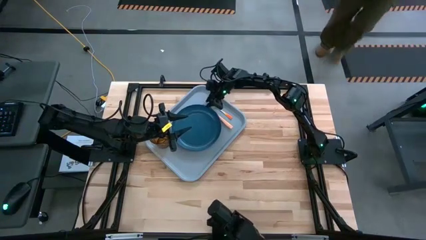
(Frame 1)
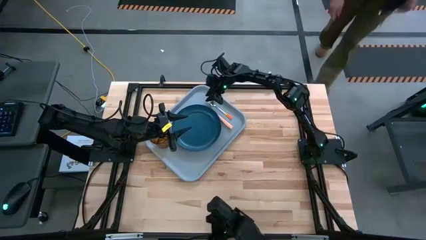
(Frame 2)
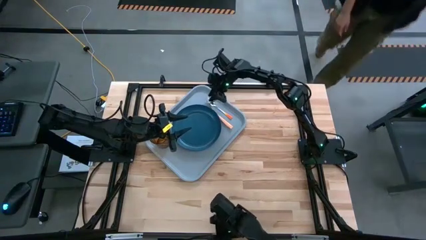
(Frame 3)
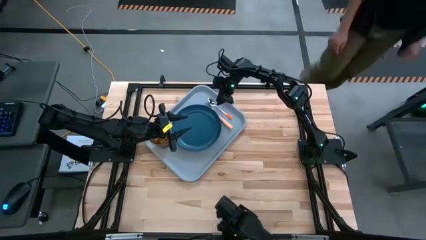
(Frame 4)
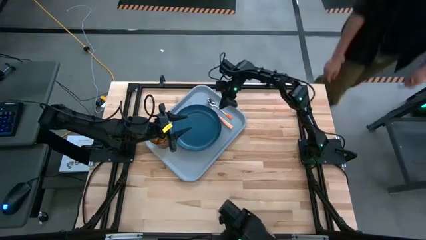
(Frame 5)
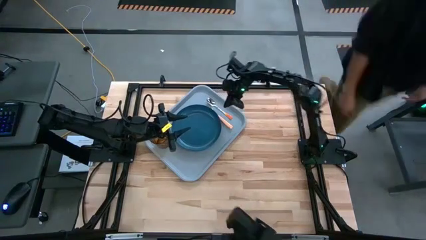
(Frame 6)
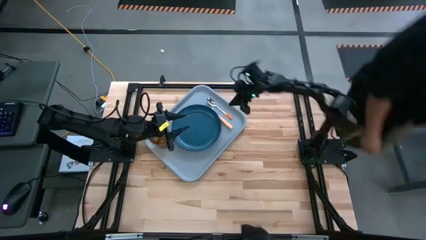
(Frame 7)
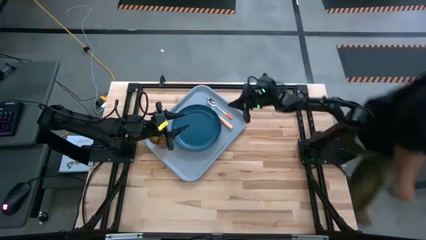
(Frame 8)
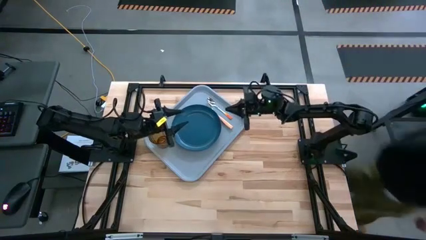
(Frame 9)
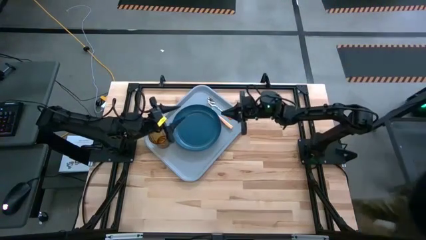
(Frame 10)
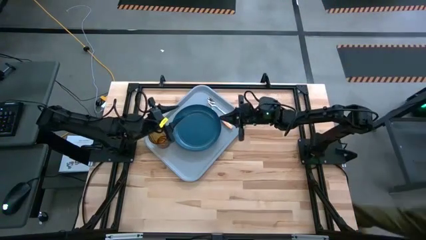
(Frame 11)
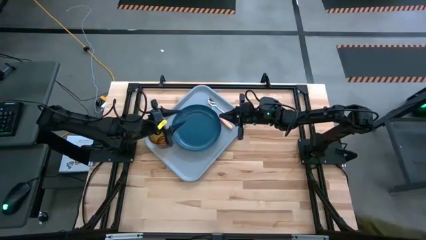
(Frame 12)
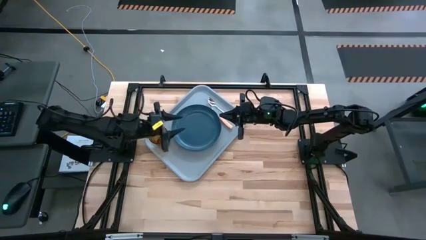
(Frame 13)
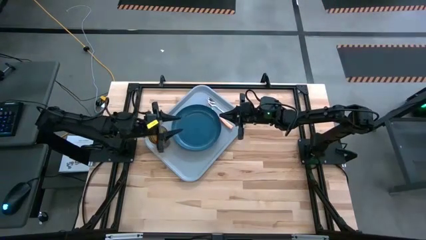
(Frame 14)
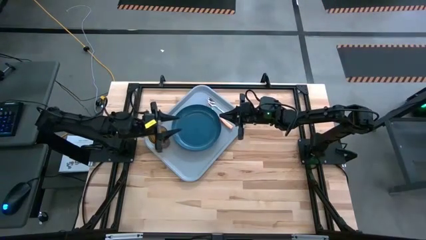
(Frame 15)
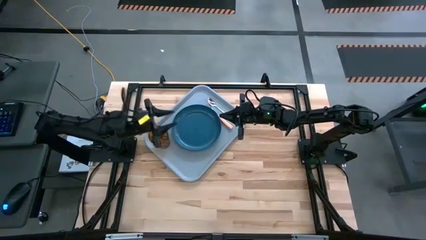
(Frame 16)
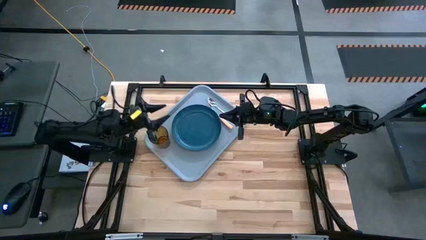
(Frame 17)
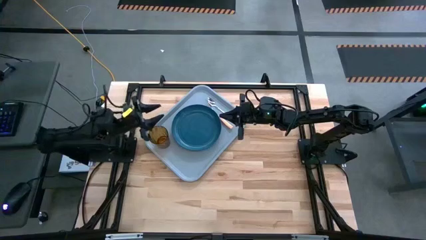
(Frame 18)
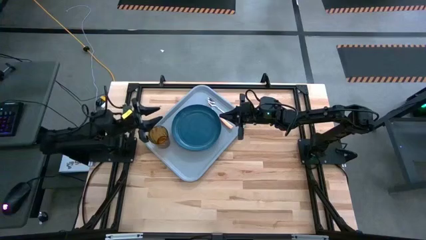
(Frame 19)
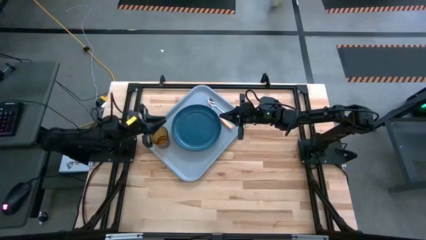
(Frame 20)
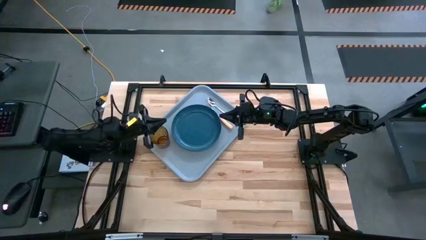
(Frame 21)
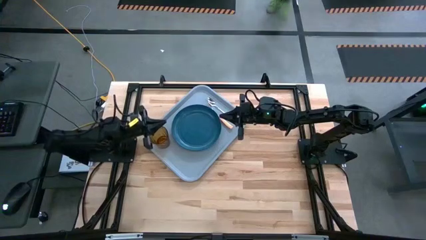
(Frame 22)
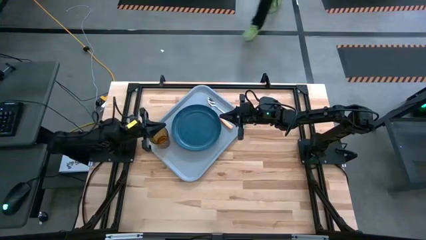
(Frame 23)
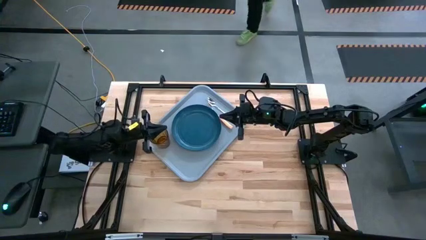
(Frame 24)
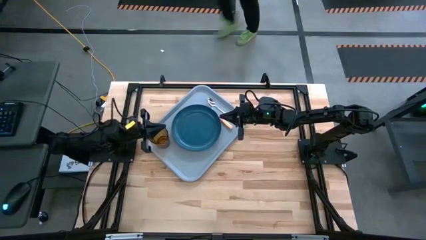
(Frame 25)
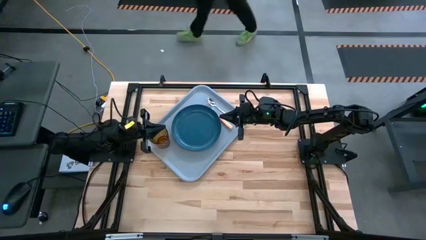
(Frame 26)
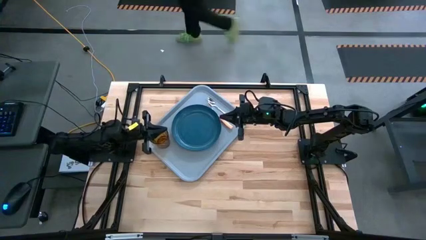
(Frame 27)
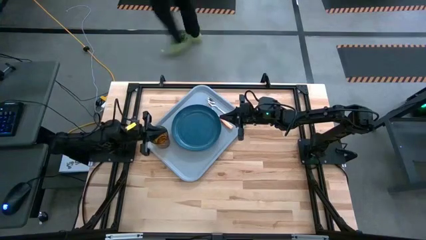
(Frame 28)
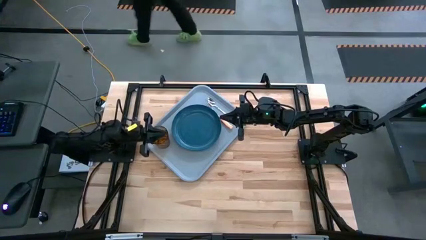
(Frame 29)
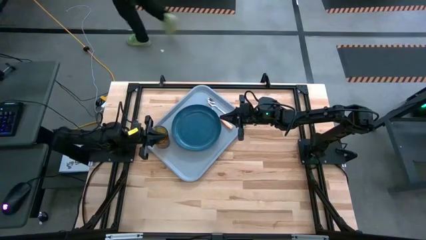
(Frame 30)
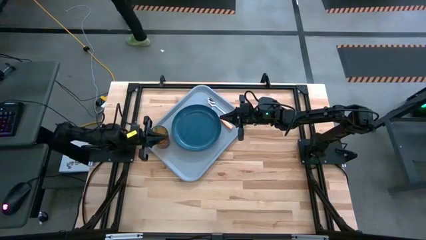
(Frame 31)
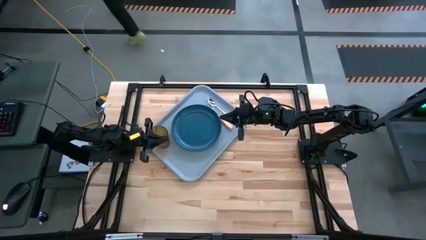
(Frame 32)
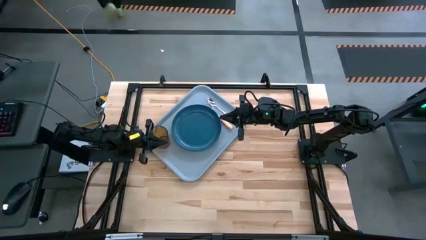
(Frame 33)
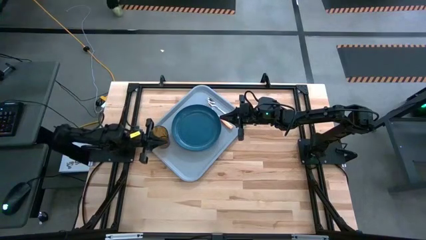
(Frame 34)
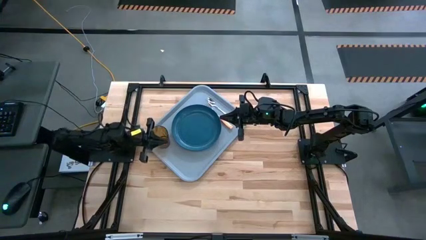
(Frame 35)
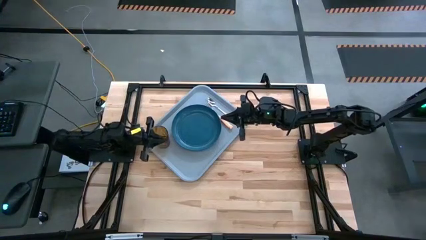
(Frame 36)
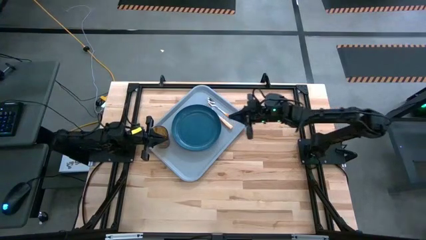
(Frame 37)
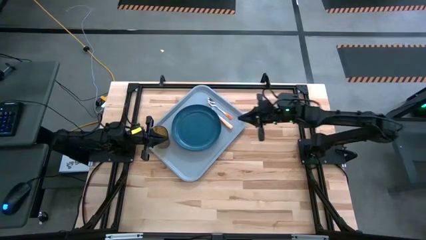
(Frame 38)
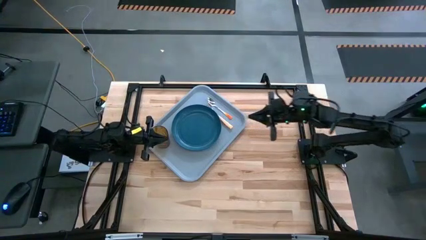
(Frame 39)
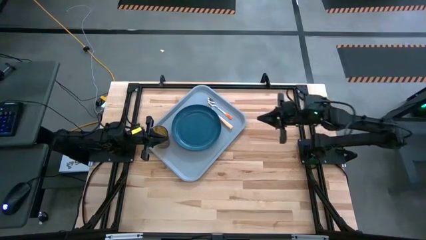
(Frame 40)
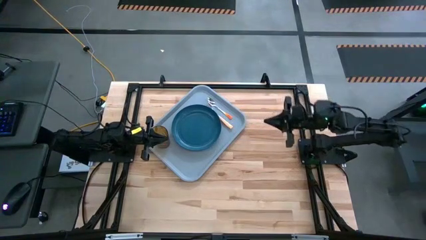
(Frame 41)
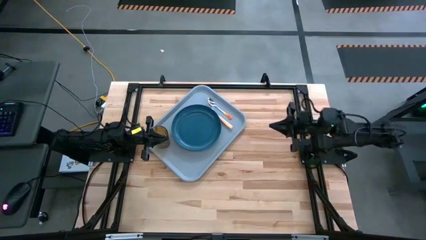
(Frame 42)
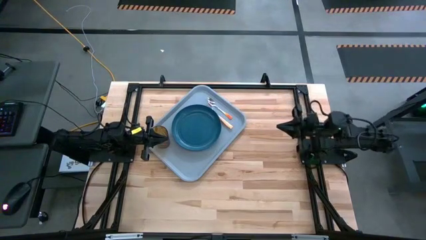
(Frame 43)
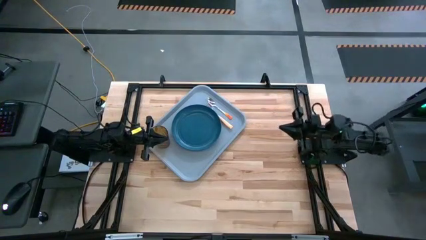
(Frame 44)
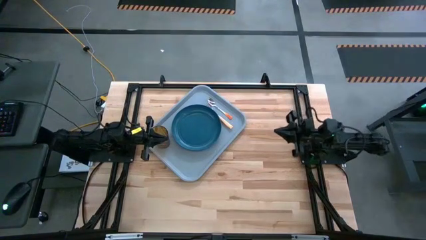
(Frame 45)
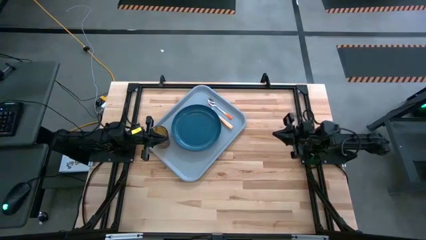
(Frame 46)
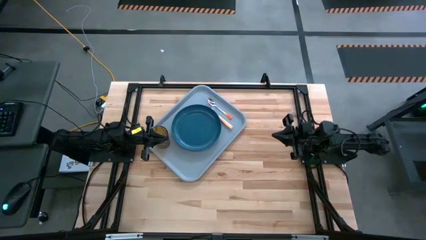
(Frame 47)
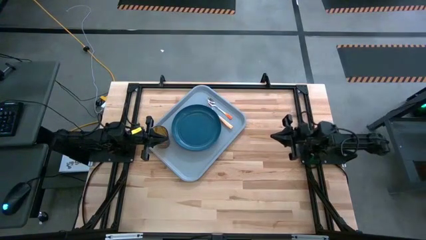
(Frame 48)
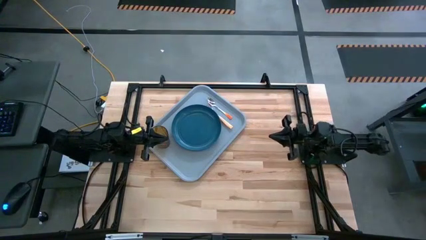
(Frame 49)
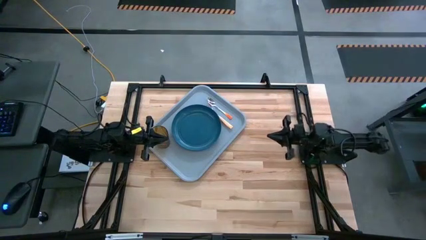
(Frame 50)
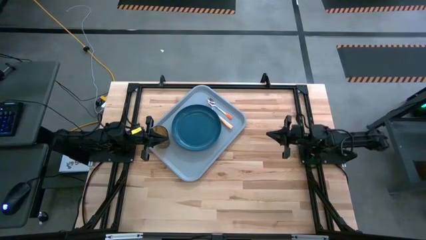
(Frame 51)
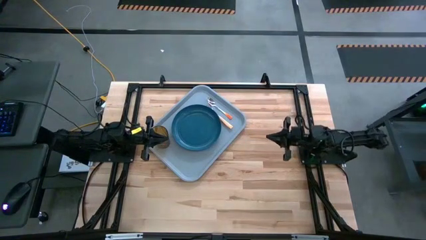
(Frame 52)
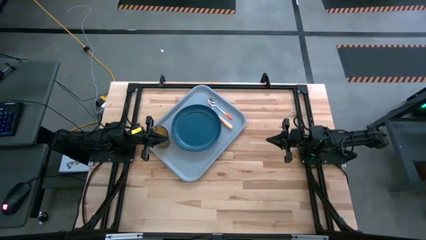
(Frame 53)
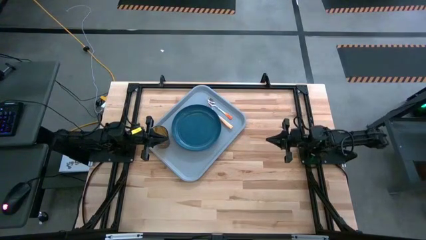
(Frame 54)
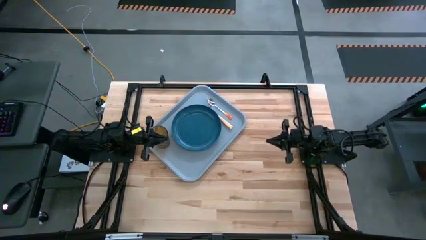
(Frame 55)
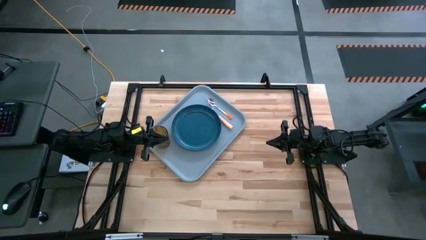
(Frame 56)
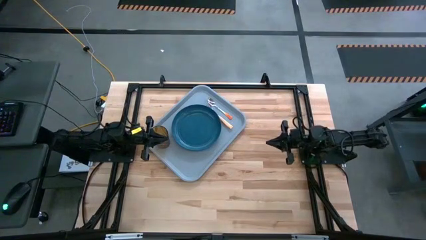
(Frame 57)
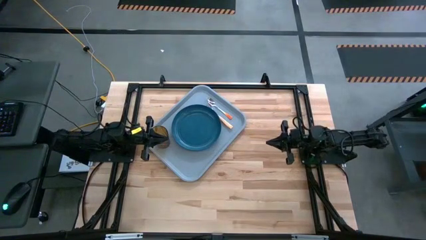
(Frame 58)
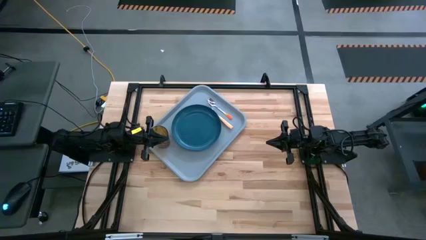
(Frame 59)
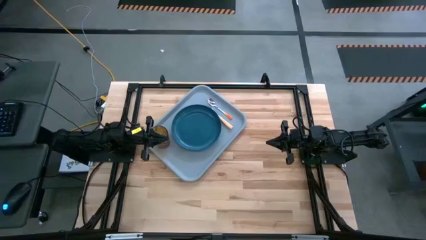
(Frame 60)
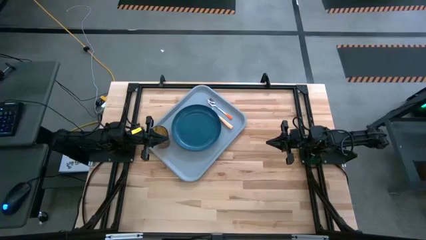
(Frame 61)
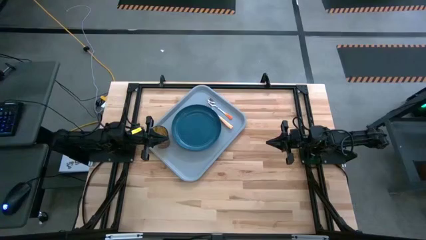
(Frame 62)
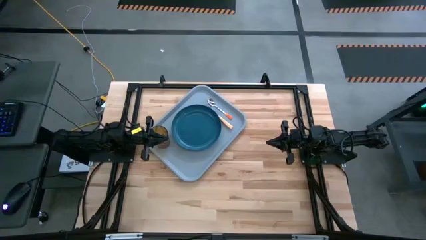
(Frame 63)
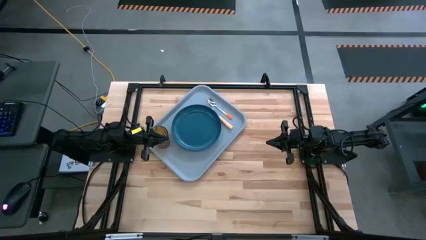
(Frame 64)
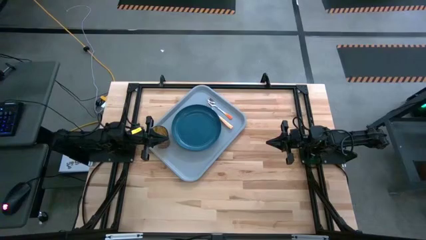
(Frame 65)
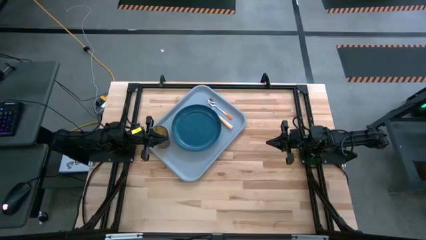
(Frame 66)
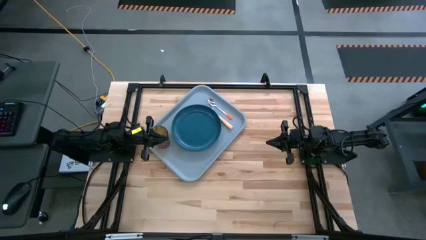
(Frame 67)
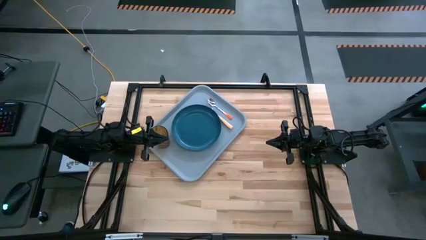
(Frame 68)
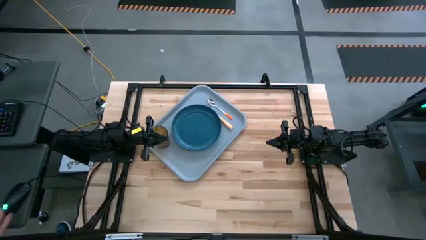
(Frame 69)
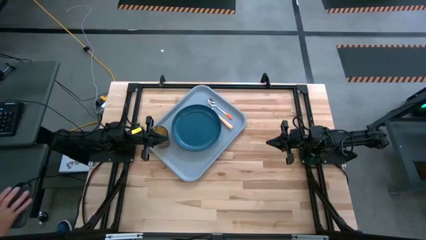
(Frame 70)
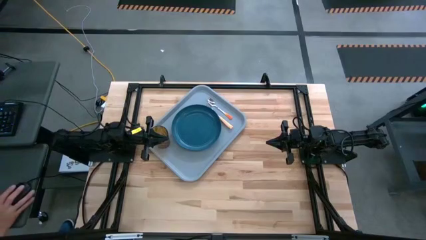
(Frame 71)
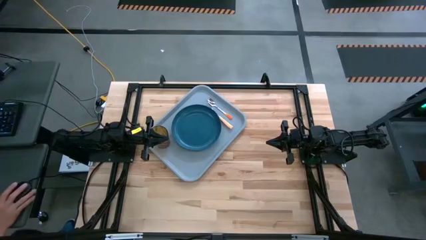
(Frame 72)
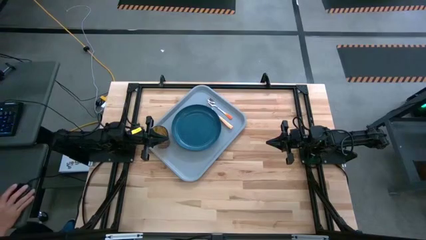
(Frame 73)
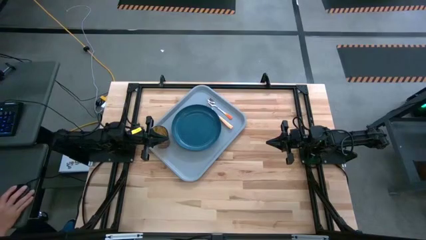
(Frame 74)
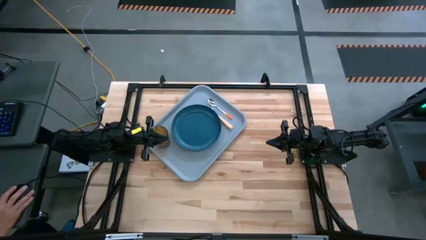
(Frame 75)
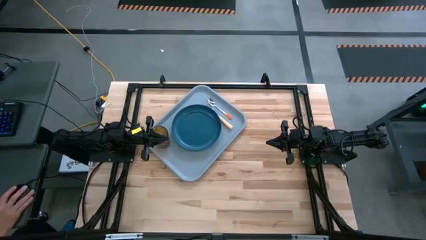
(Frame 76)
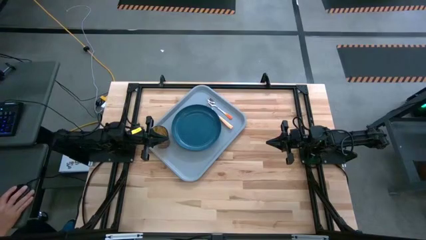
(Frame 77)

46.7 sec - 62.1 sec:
Task: Pick and place plate/cup/fork/spoon on tray
Return to Home Position

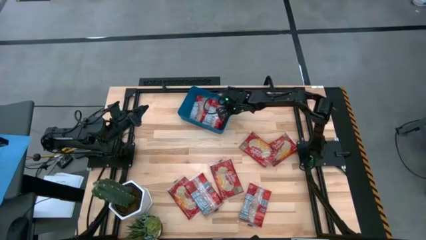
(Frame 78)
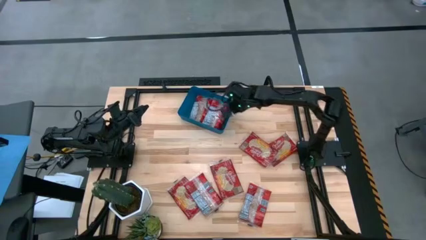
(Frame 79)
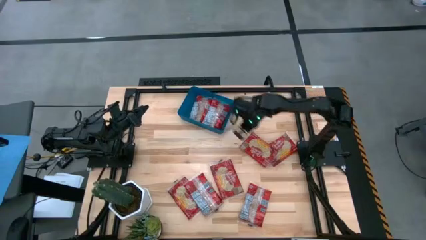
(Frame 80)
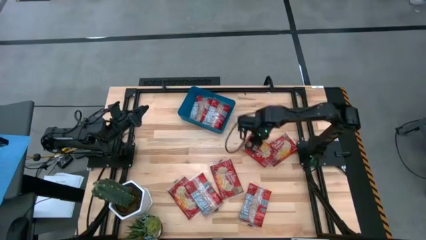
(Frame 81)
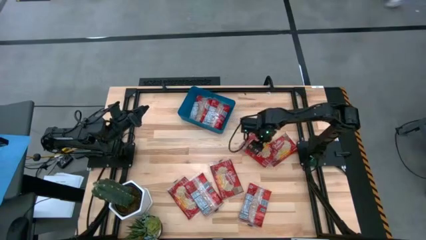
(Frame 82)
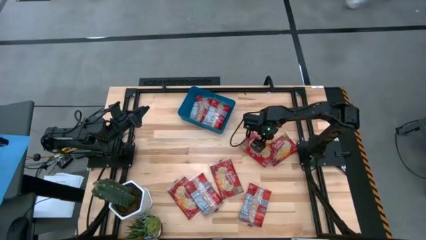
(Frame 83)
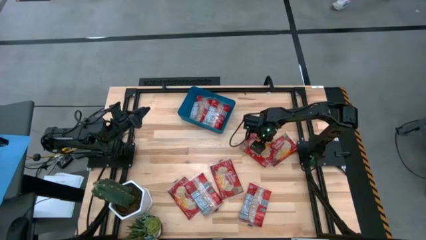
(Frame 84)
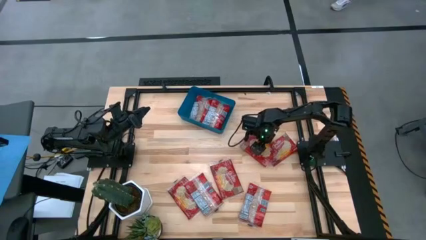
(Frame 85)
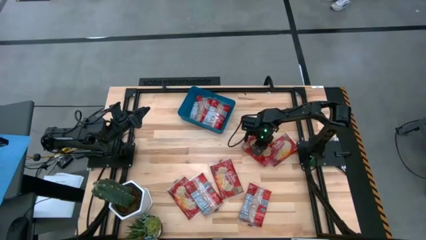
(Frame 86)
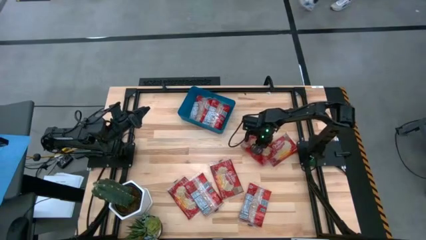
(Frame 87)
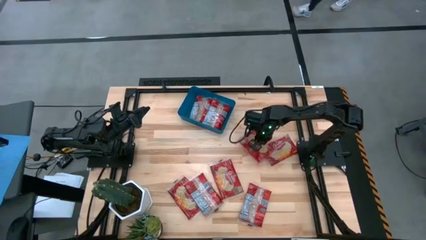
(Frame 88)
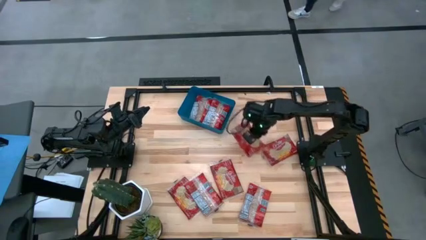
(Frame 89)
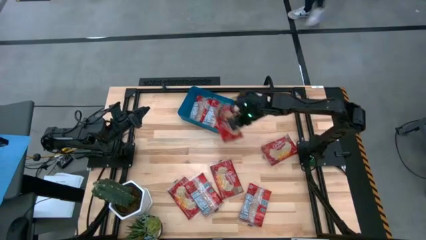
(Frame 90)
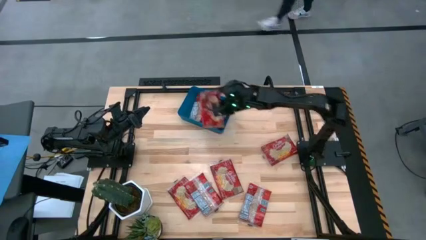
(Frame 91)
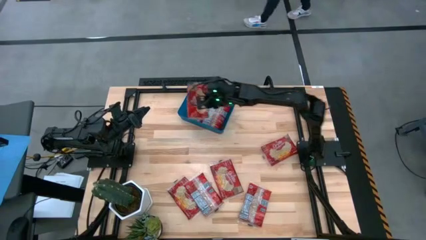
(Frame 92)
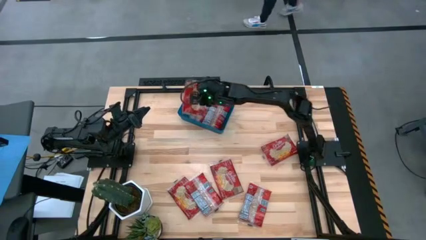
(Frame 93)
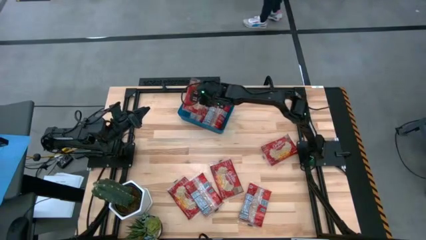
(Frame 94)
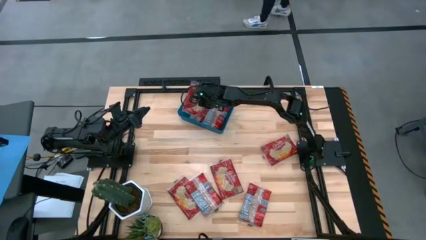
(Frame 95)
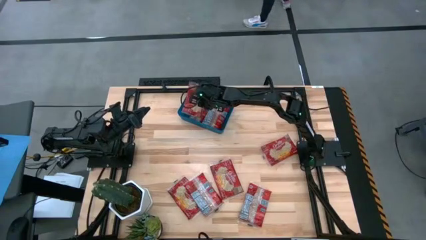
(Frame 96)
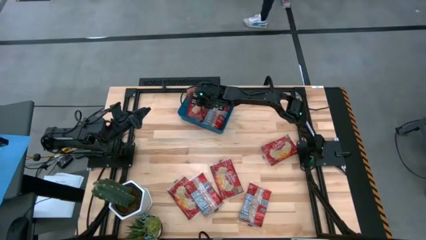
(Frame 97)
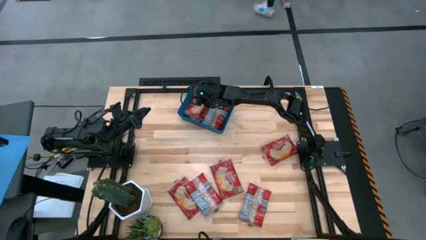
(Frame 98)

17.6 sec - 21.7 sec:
Task: Sort popcorn bags into baskets
Put the red popcorn bag into the blue bin
